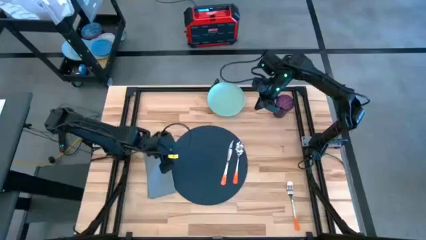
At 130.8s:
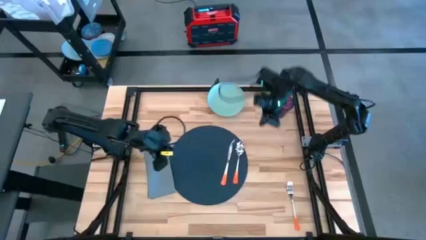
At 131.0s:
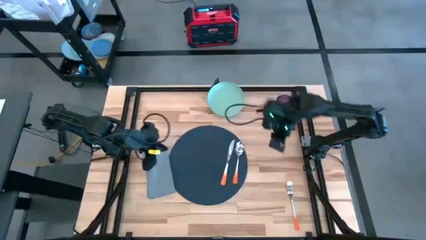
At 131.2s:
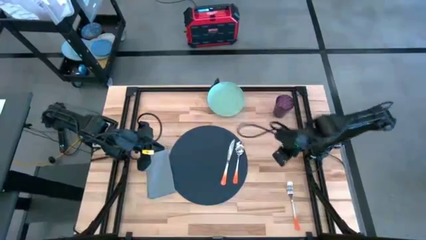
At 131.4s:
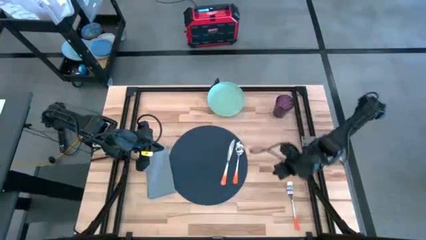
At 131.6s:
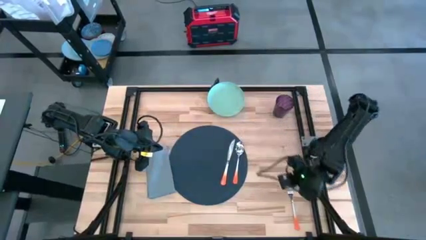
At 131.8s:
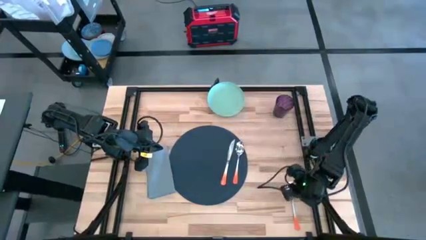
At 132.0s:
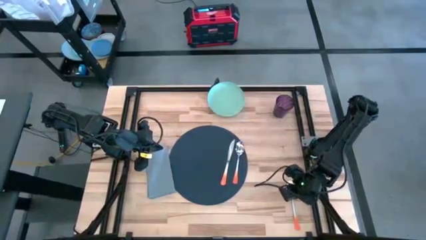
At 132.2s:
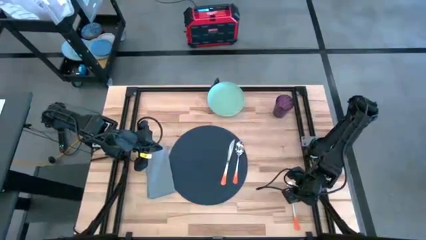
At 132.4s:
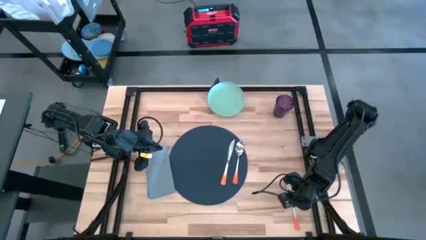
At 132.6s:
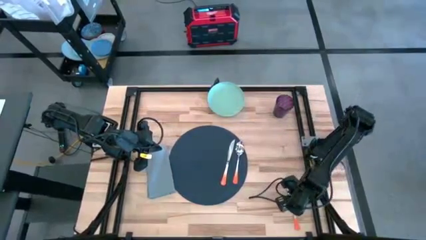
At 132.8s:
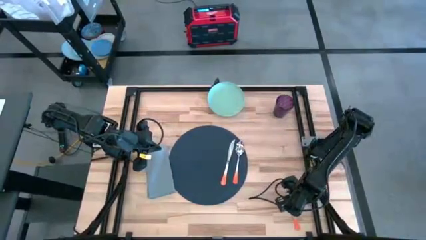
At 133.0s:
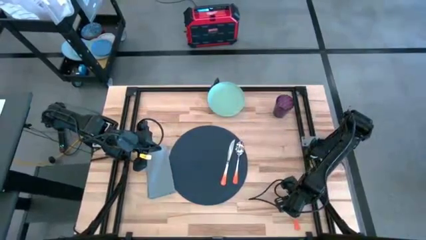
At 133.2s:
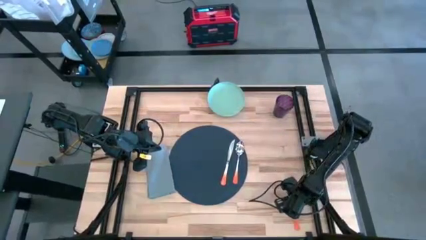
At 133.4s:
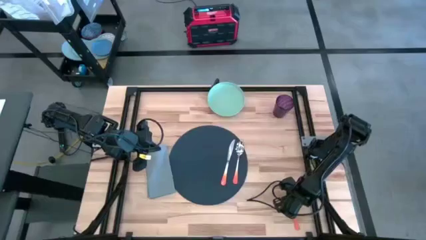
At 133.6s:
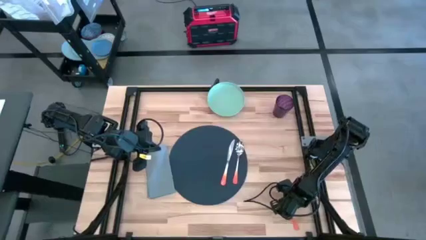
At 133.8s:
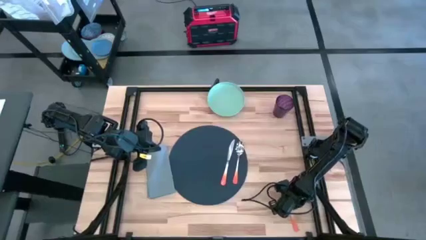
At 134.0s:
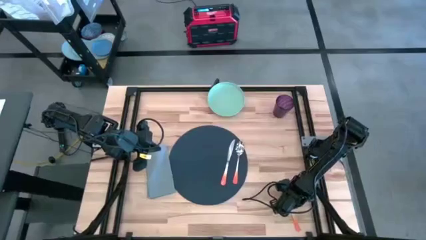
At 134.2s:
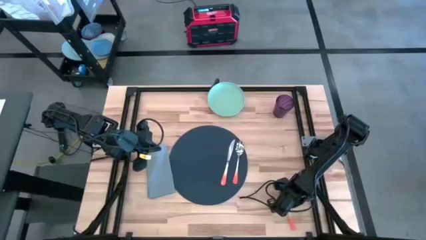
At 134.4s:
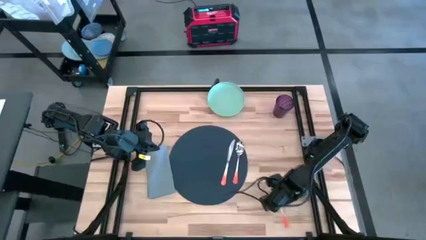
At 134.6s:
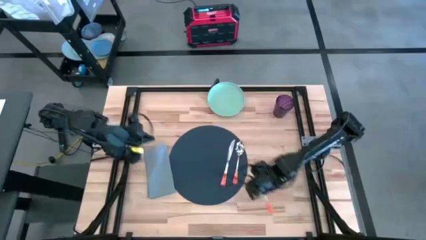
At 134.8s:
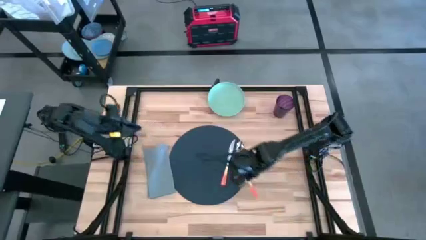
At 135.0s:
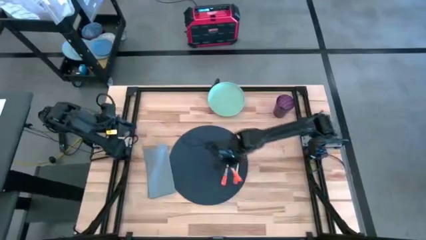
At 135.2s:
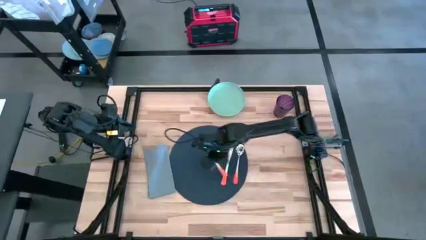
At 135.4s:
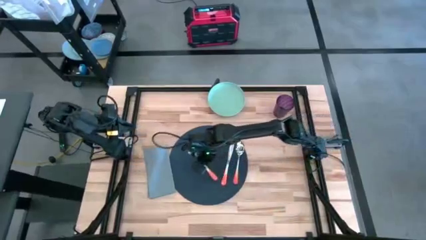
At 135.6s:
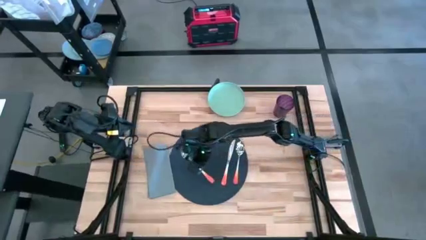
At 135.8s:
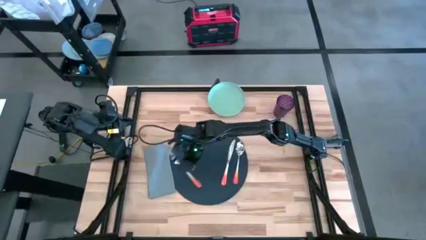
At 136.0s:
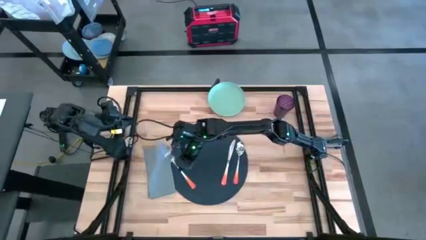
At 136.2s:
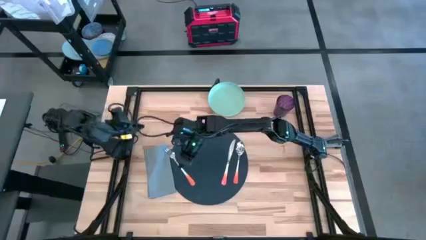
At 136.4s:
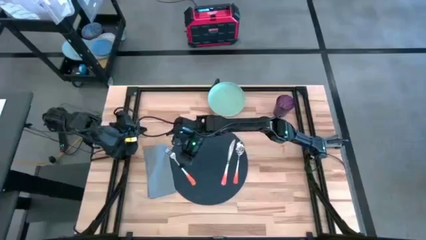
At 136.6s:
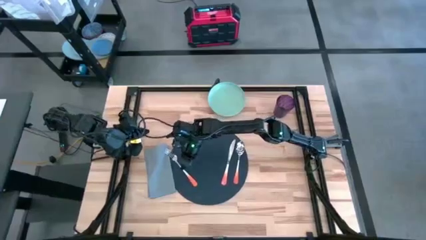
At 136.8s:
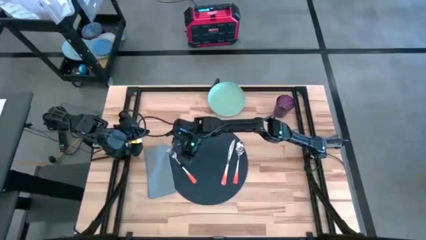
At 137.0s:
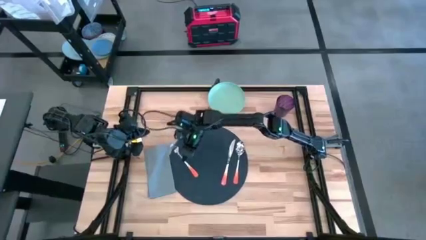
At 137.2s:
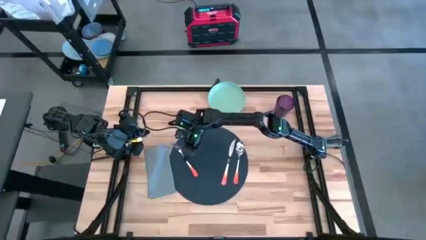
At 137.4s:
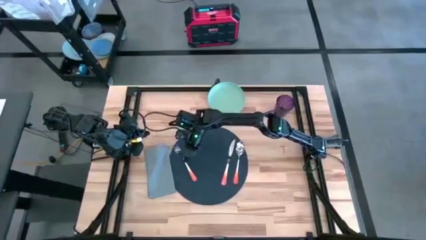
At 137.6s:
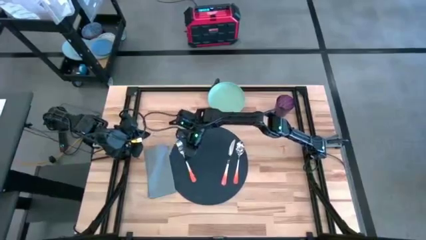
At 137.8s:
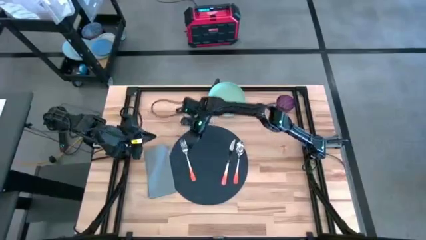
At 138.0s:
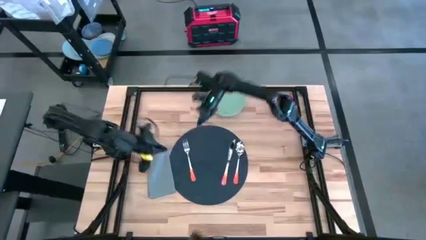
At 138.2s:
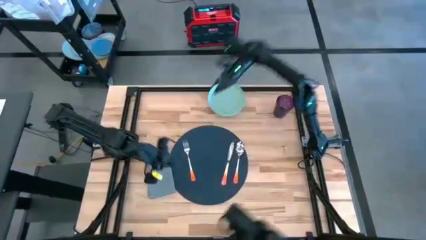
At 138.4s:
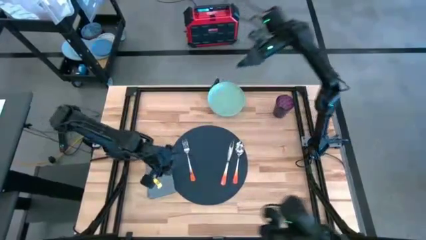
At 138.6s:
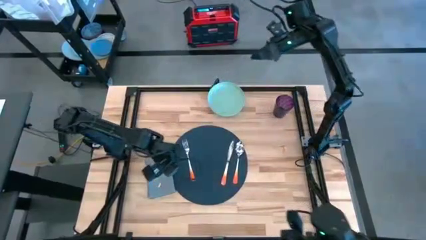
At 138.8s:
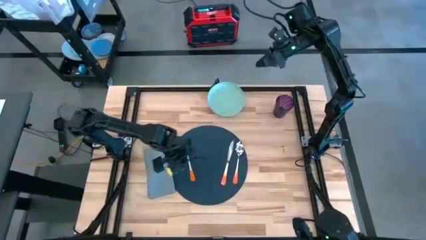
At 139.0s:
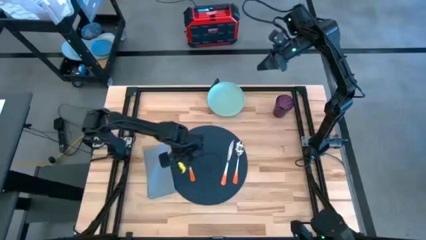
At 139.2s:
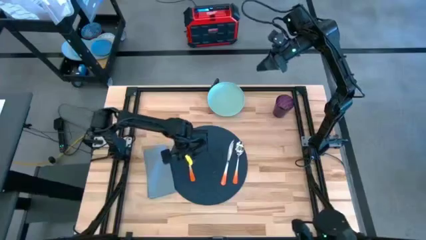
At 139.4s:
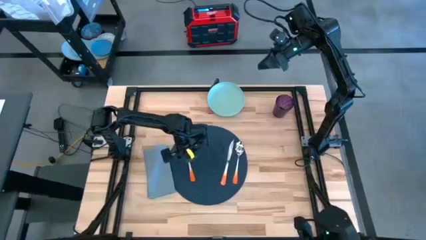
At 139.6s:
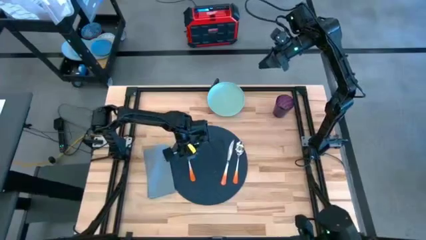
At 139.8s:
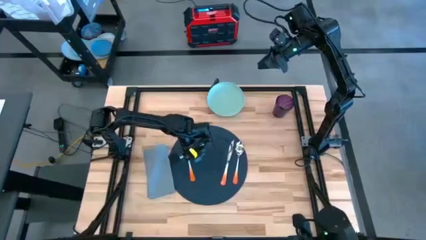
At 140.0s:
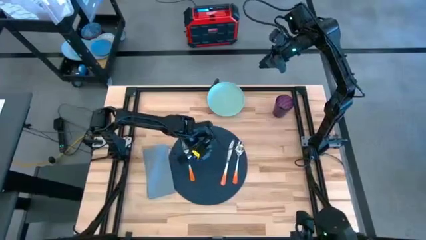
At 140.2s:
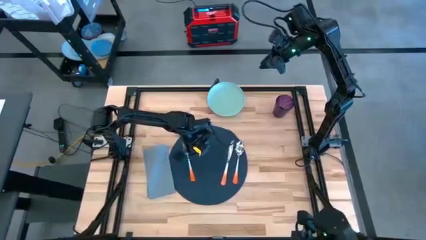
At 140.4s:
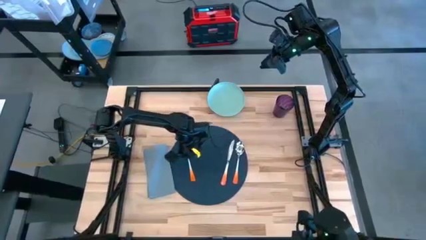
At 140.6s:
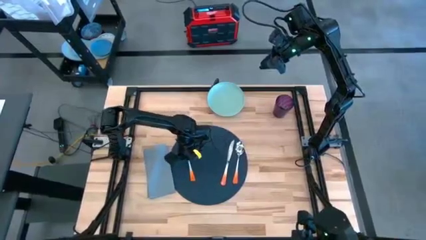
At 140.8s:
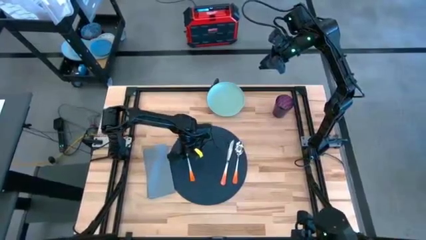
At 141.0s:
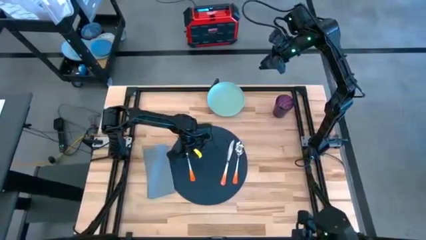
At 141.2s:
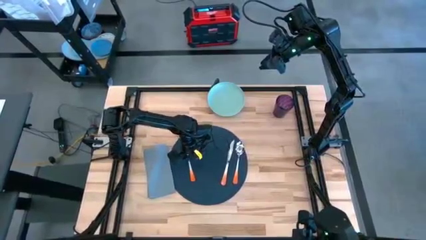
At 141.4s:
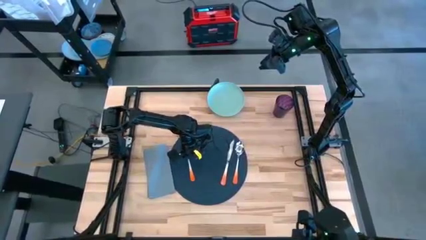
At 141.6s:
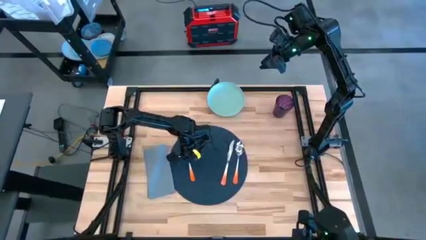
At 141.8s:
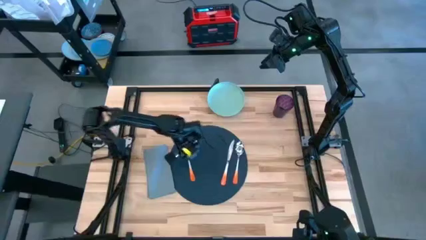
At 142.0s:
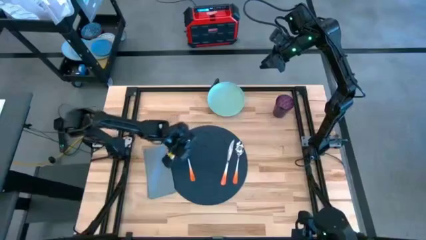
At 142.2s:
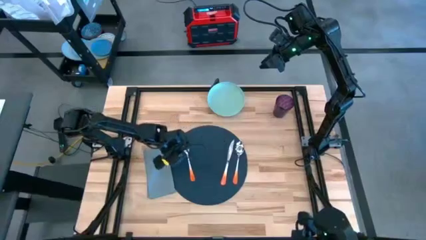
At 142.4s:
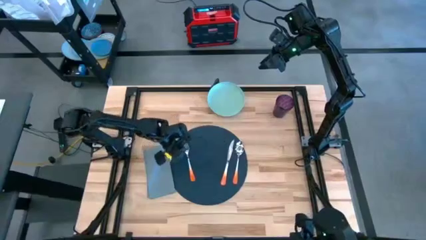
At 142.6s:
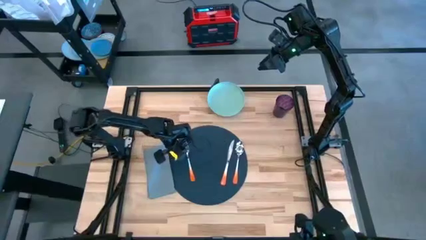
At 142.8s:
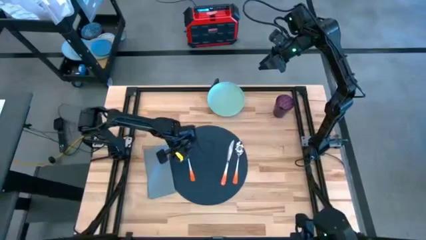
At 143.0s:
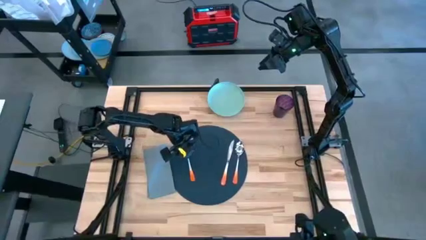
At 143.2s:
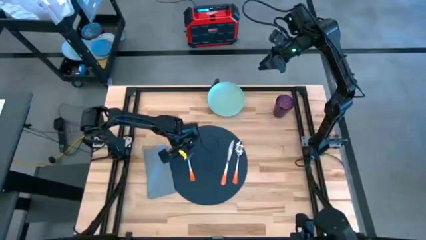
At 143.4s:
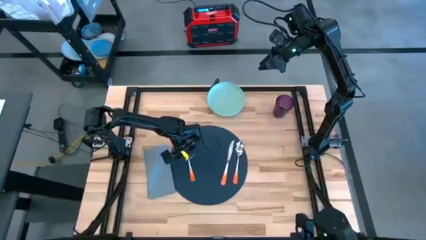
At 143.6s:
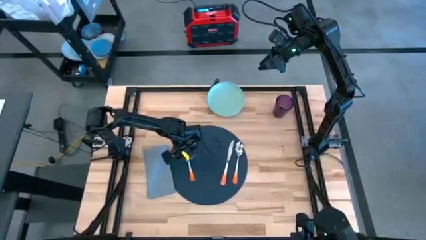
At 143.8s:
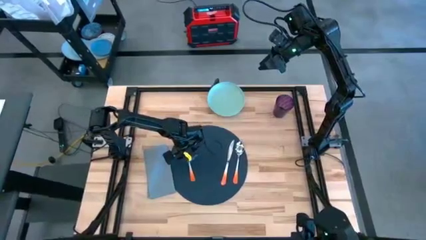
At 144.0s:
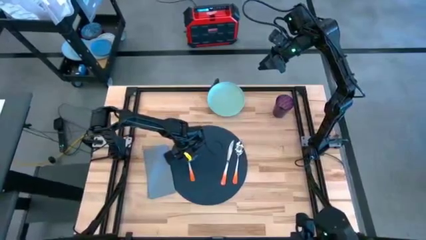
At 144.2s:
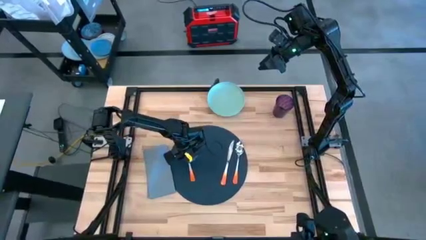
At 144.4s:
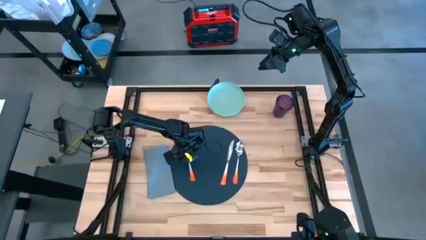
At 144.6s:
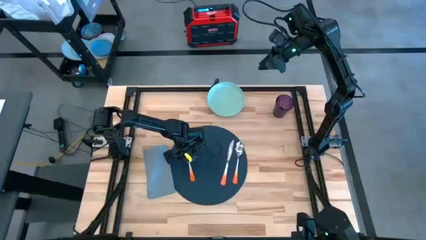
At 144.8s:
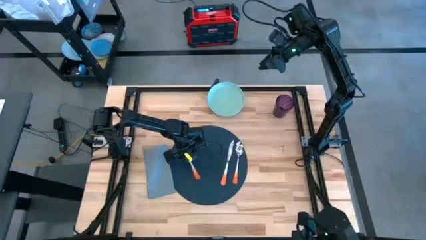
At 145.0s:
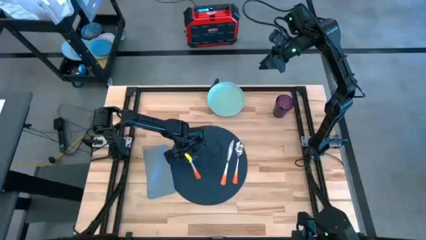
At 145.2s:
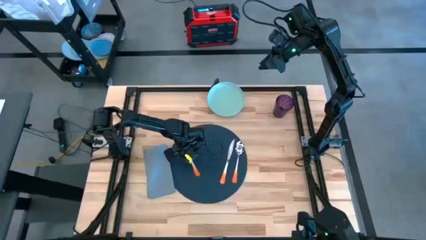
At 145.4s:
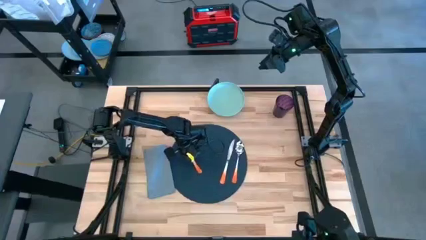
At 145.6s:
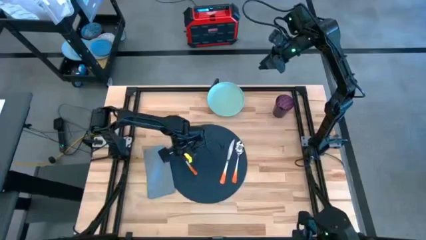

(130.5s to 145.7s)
Task: Set table place
Put the orange fork on top of the gray table napkin
